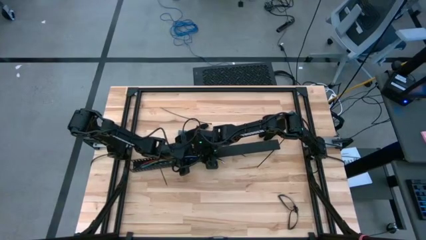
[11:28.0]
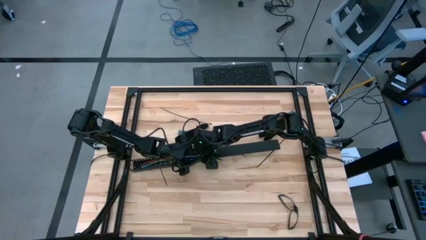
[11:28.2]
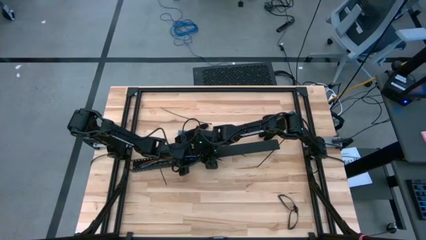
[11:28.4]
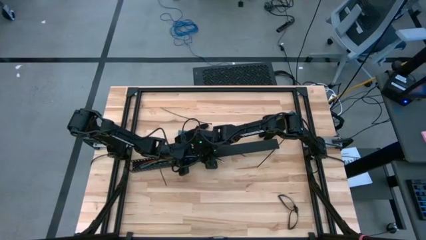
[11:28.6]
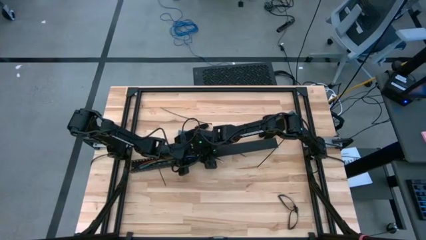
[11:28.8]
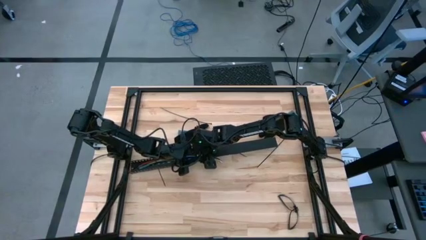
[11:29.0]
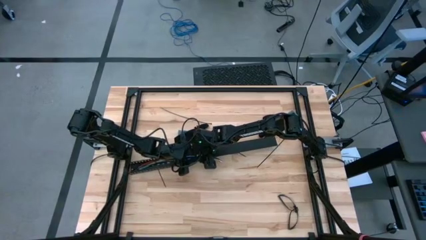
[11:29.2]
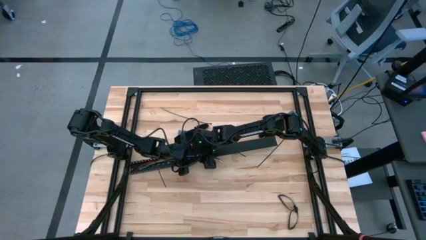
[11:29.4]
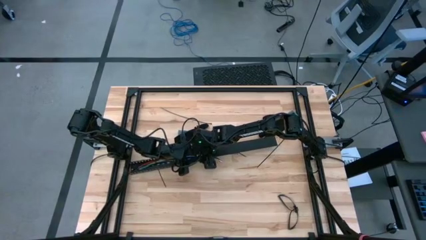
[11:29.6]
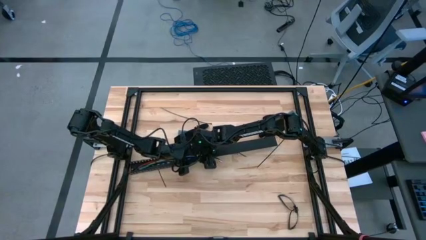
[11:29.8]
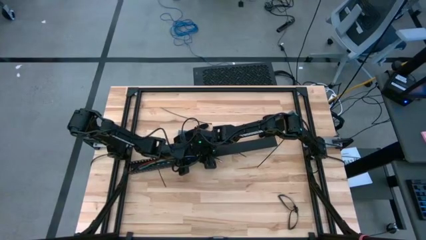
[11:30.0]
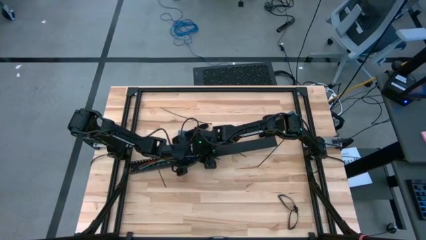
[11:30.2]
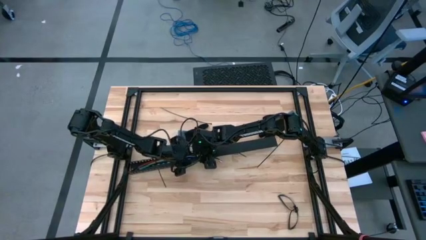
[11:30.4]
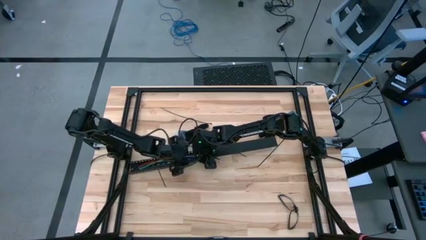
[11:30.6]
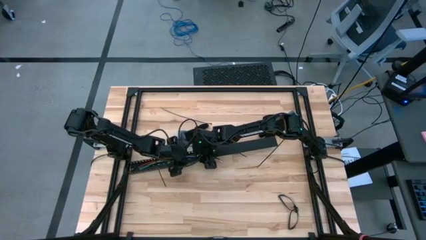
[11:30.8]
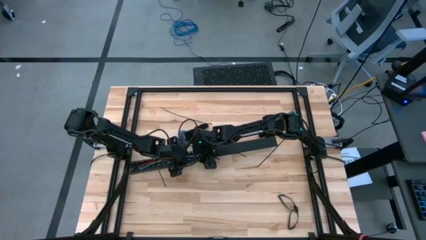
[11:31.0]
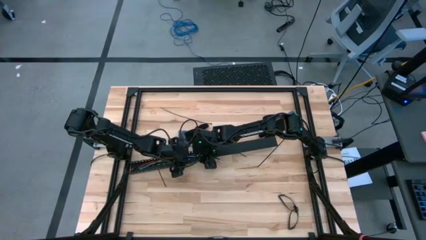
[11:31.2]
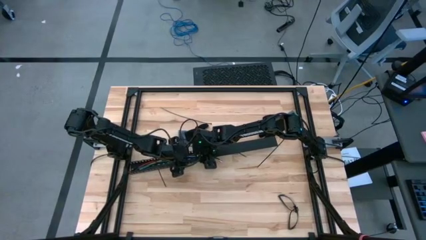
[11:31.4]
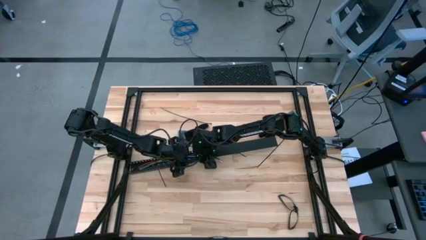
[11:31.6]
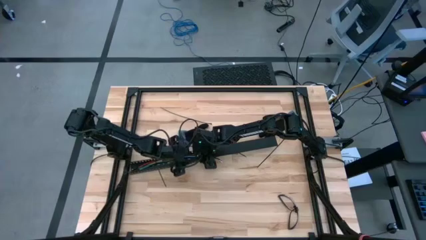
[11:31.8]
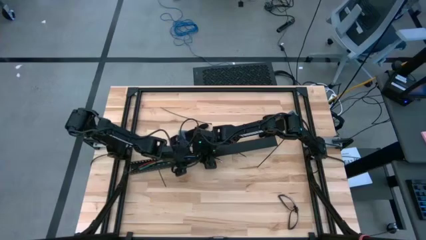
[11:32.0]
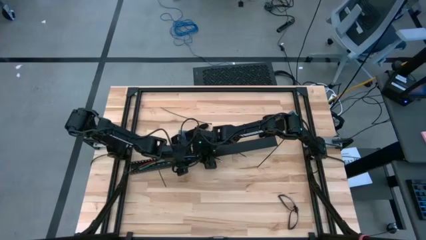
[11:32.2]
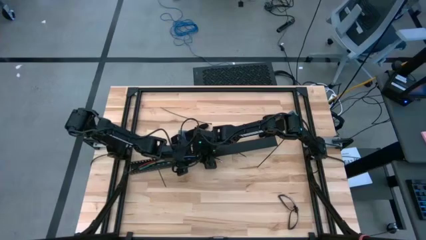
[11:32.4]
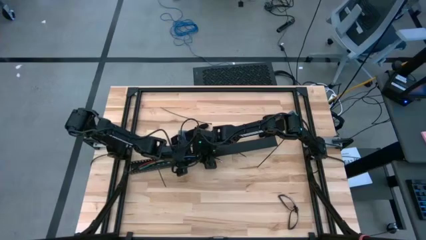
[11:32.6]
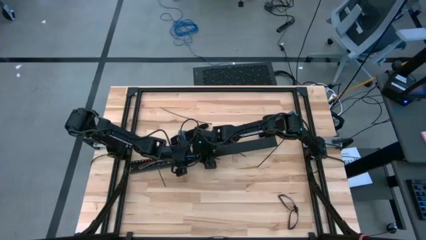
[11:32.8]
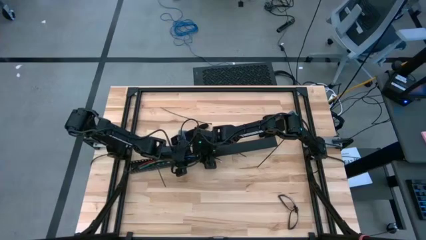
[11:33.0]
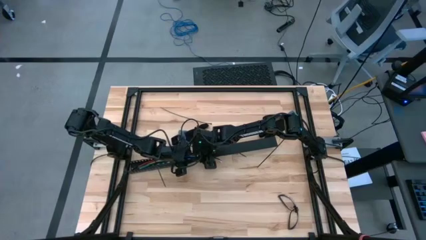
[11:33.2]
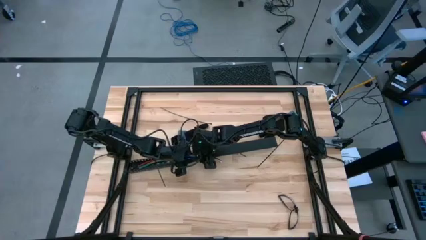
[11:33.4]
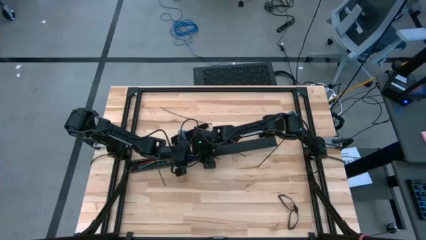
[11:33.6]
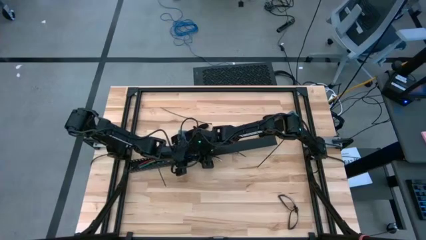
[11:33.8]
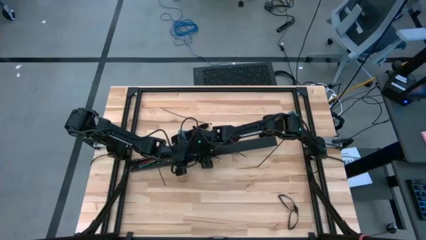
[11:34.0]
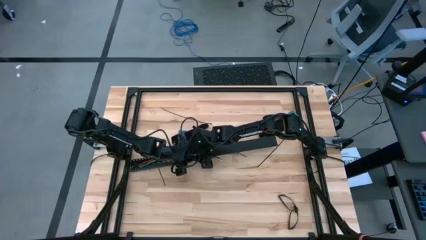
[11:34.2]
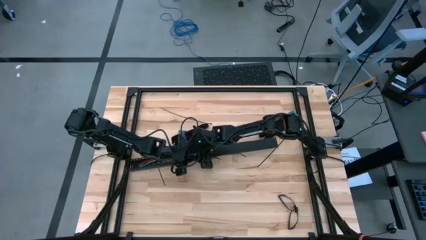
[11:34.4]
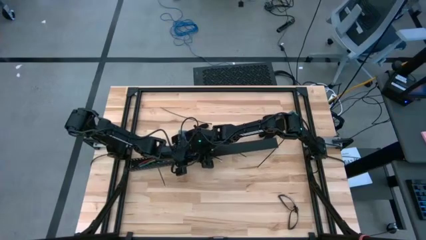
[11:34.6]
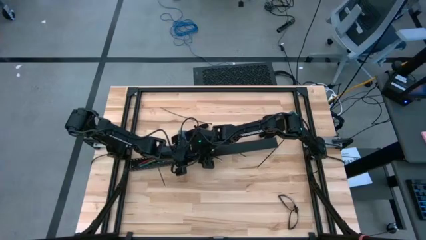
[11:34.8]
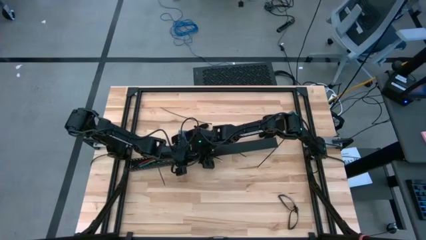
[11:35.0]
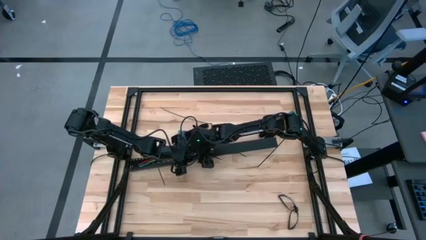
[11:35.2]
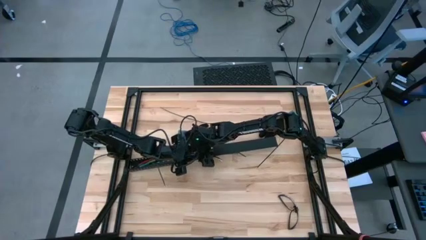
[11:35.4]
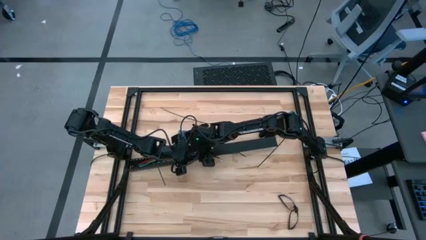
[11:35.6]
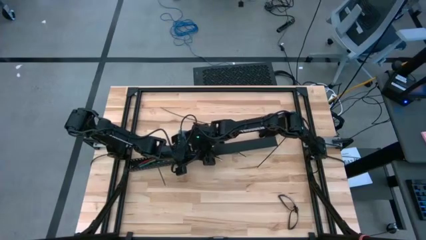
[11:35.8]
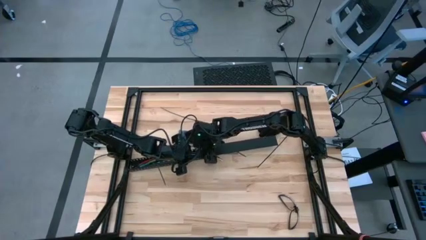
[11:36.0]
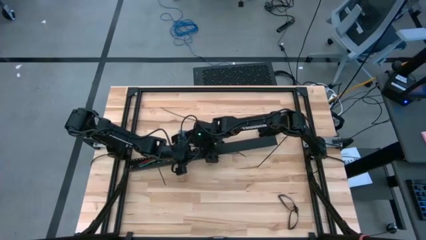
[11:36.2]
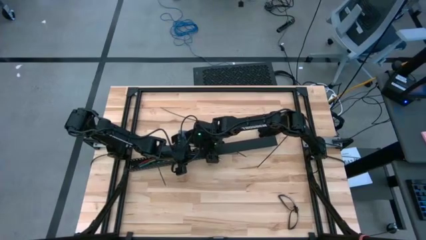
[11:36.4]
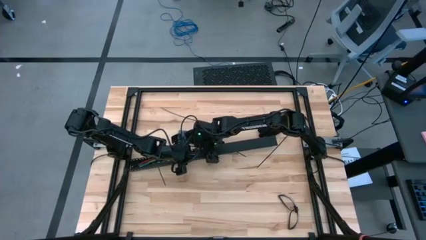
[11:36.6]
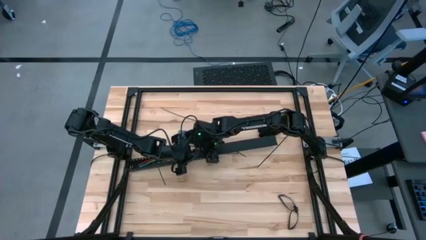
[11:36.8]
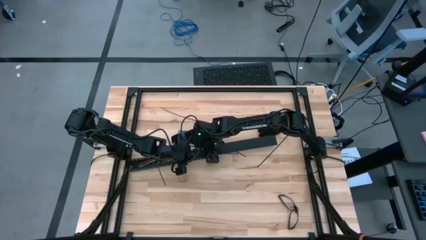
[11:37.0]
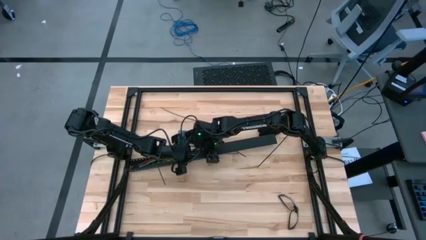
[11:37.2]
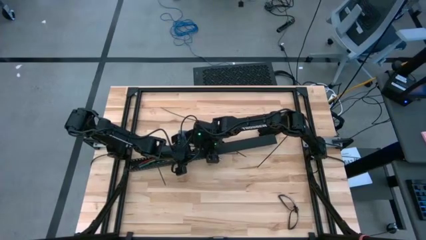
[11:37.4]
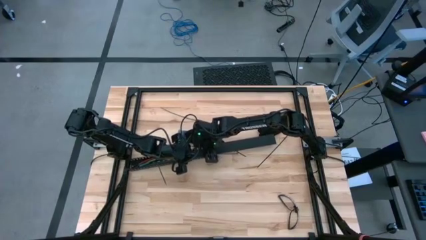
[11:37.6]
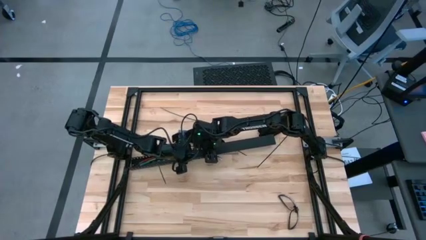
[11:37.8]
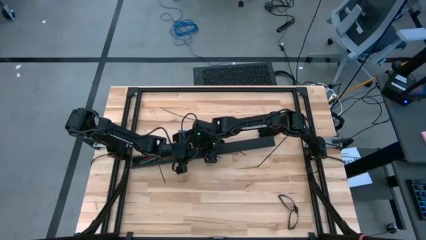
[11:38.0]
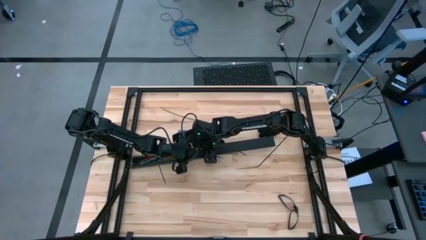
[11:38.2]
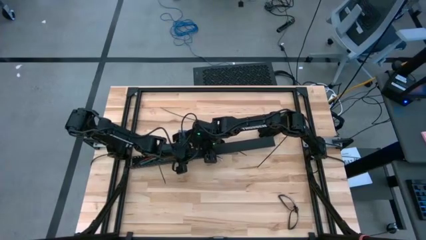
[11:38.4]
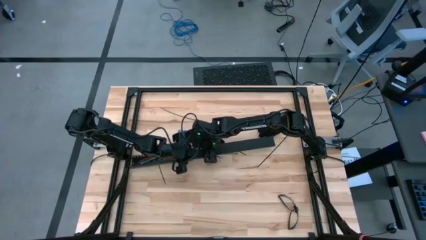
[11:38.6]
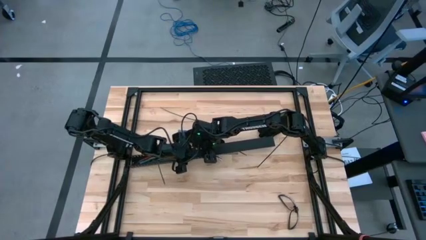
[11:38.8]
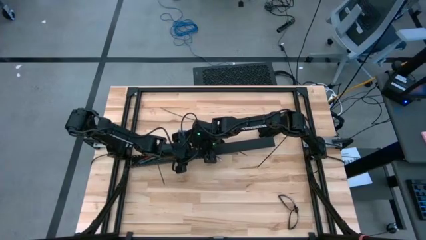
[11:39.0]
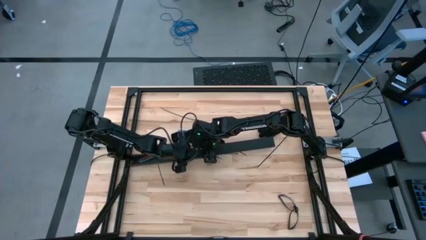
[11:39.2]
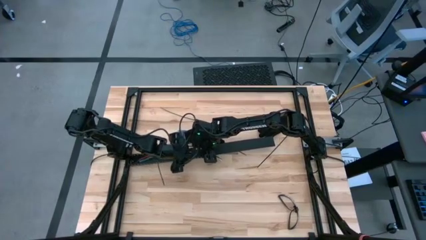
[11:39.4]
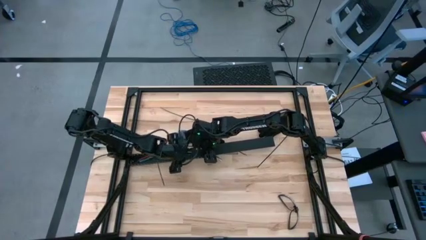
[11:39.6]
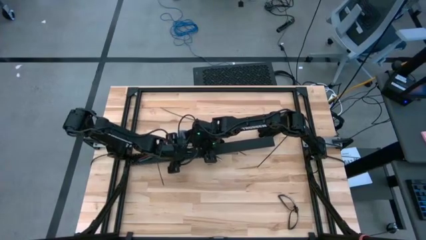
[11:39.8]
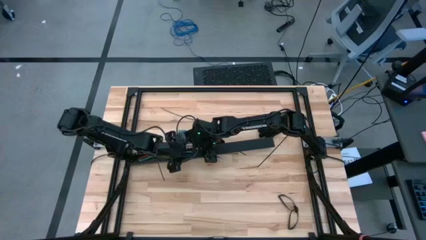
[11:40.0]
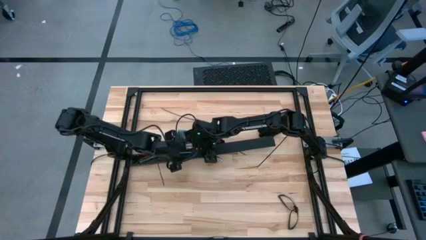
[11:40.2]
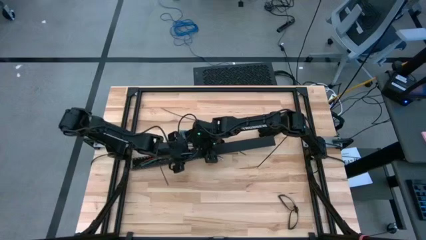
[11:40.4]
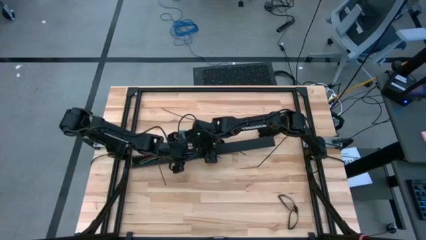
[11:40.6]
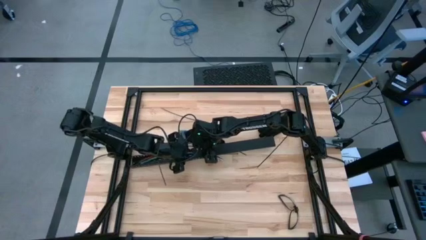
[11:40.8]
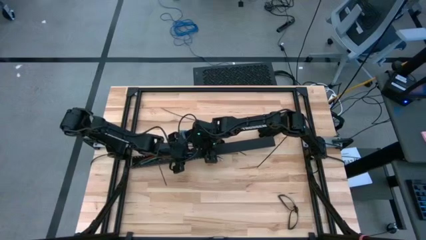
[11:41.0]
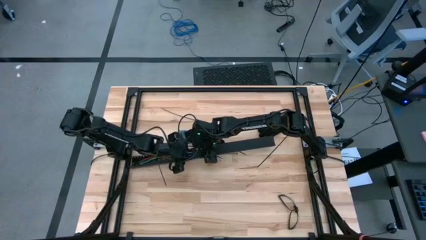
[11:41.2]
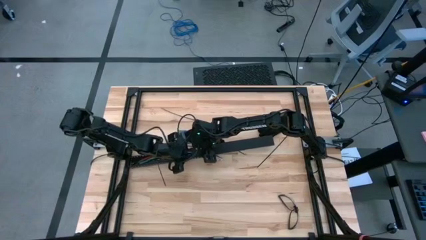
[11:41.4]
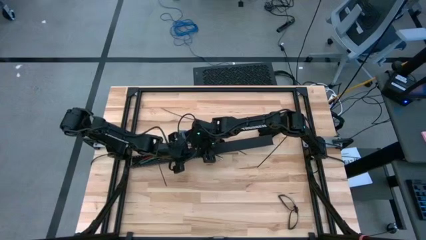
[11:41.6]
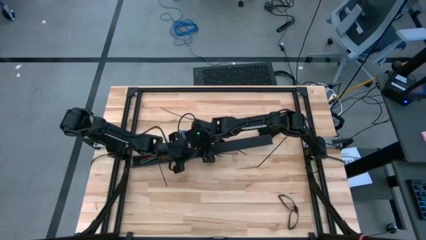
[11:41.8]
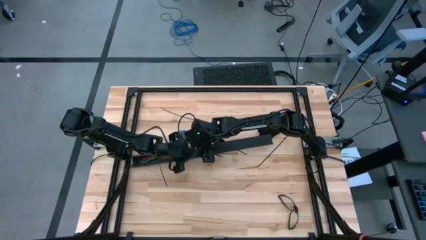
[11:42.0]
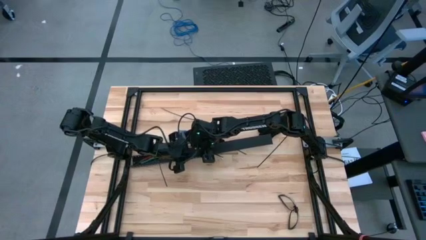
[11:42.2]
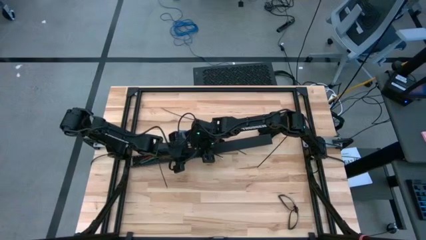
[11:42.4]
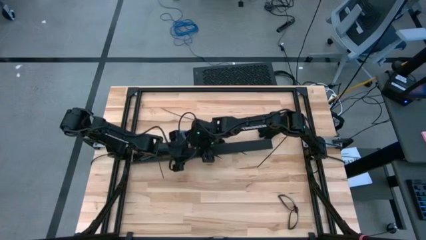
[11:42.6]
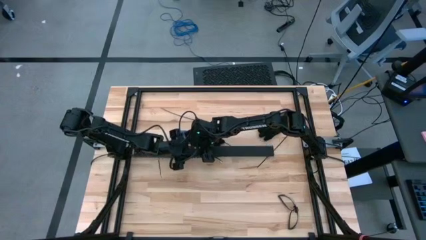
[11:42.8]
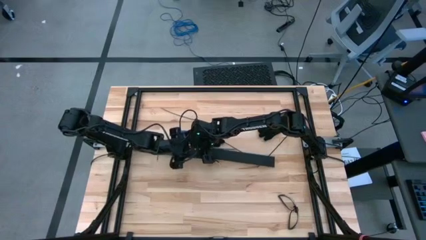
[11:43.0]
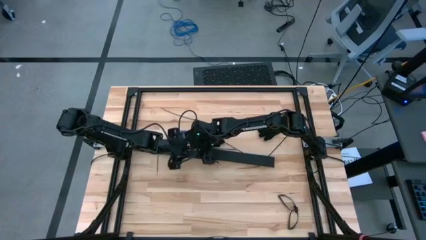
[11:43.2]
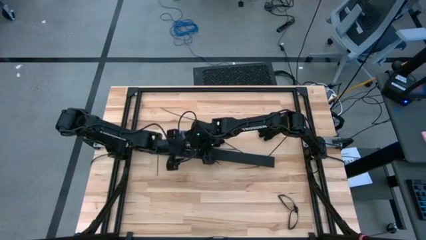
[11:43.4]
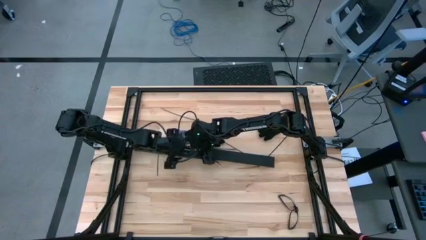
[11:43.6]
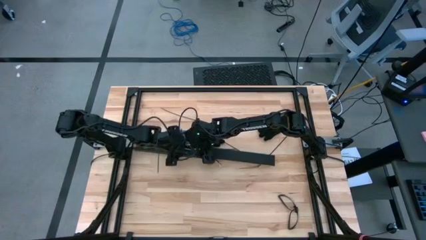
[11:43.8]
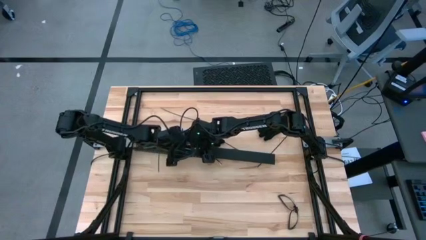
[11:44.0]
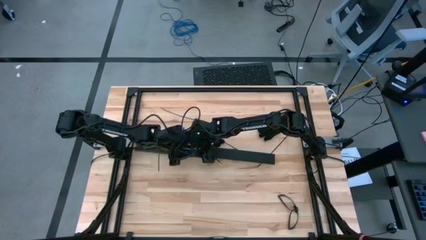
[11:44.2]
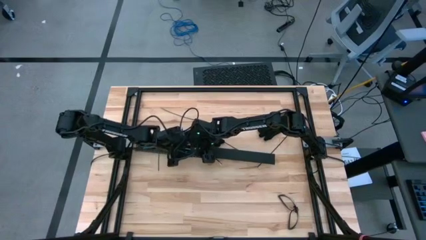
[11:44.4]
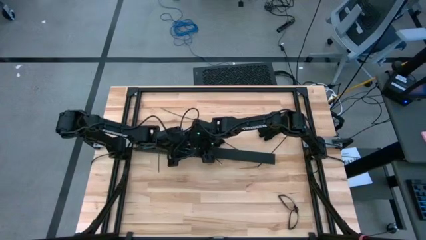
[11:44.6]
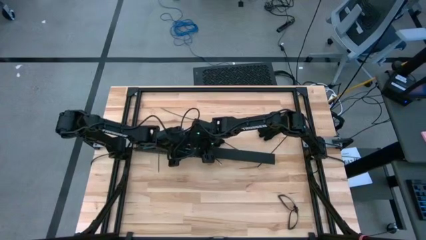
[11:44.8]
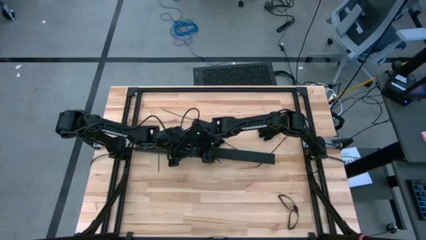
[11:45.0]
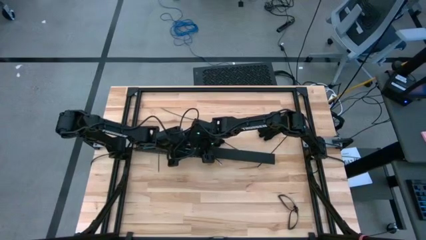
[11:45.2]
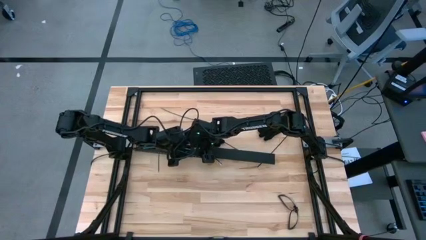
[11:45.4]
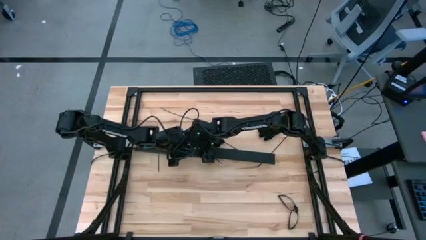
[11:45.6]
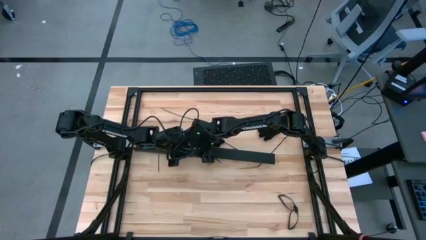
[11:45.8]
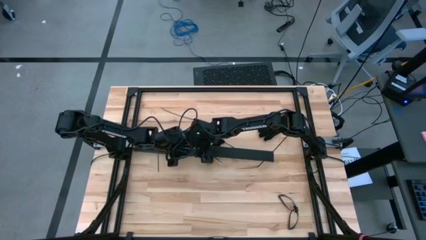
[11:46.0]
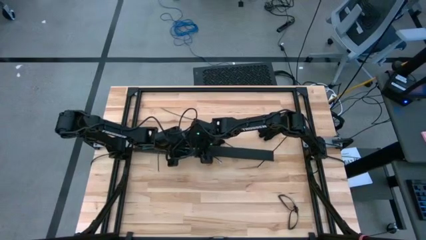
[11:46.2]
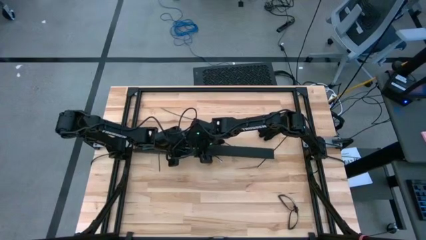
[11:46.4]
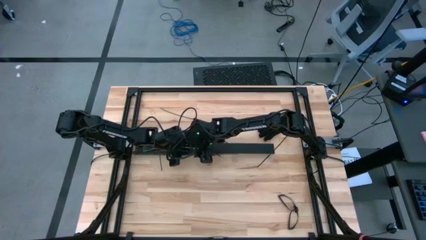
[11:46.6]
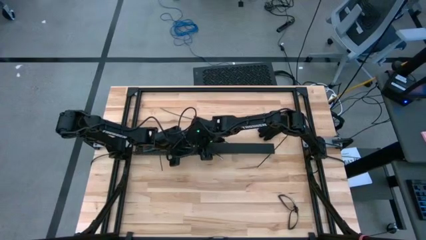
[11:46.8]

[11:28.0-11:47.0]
Task: Ziptie cables
Close the cable duct
